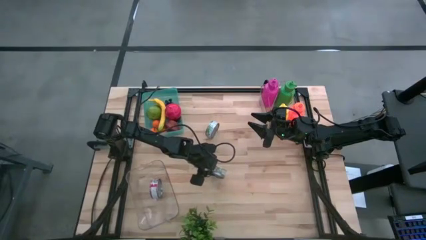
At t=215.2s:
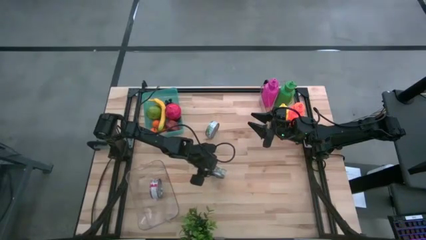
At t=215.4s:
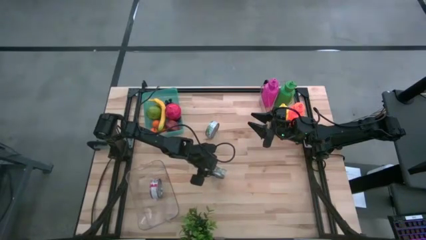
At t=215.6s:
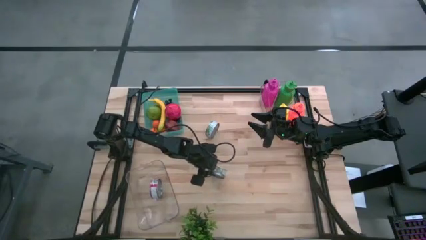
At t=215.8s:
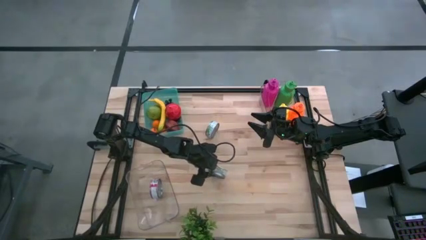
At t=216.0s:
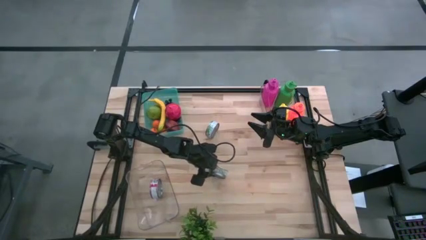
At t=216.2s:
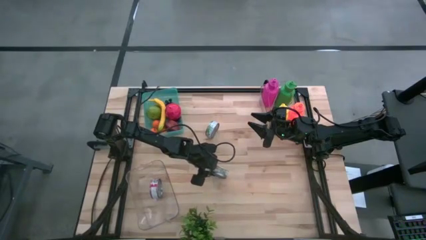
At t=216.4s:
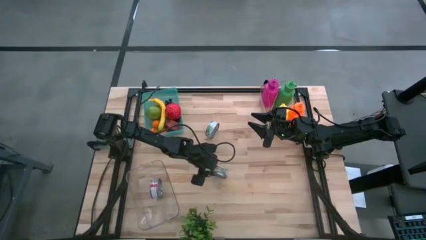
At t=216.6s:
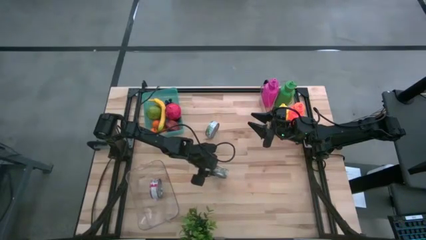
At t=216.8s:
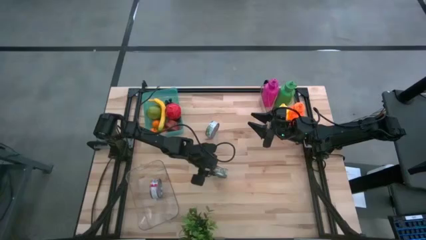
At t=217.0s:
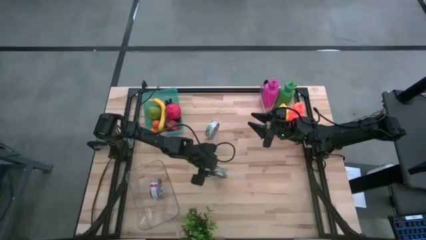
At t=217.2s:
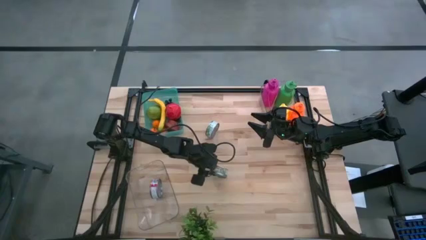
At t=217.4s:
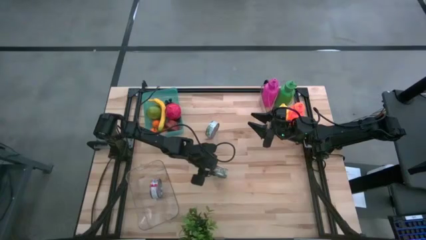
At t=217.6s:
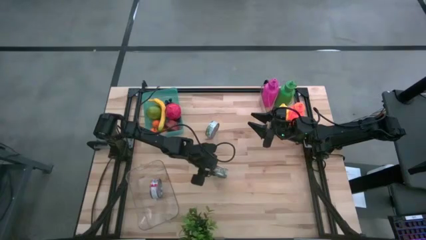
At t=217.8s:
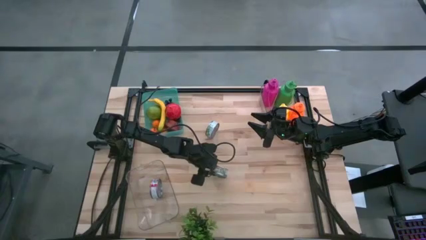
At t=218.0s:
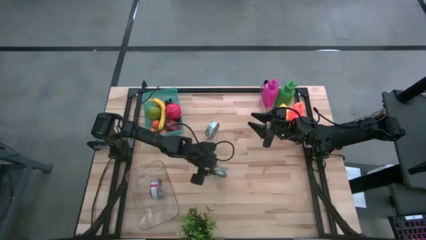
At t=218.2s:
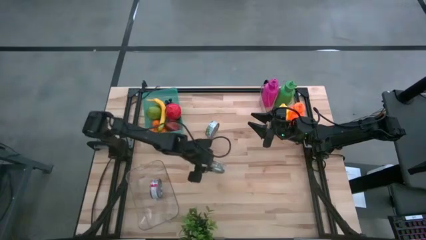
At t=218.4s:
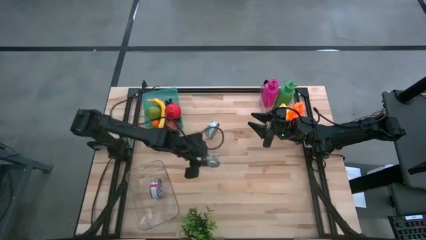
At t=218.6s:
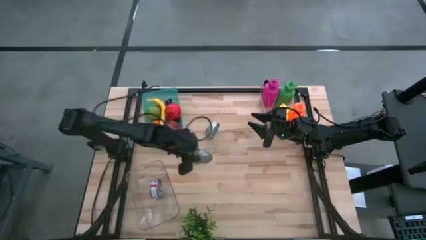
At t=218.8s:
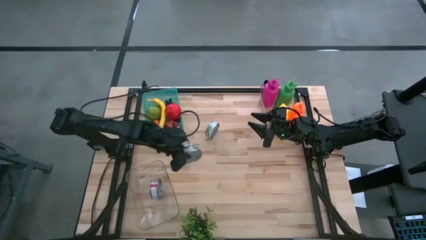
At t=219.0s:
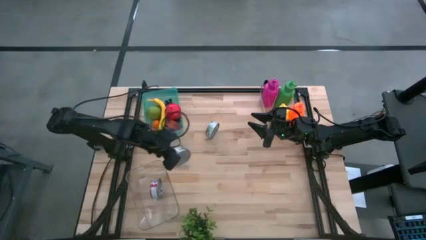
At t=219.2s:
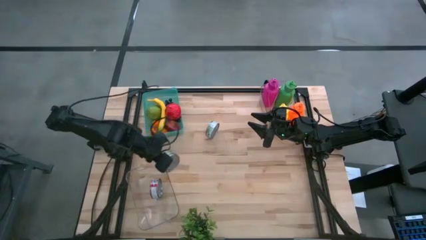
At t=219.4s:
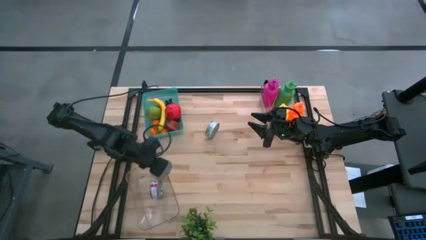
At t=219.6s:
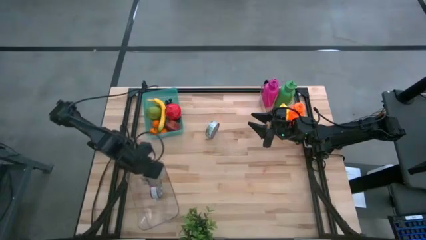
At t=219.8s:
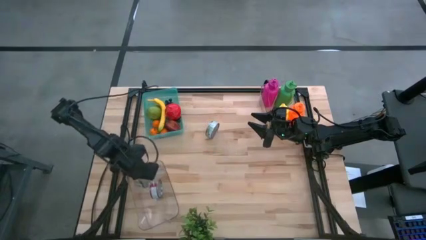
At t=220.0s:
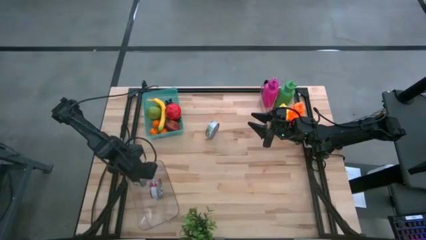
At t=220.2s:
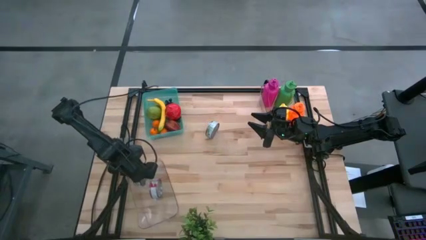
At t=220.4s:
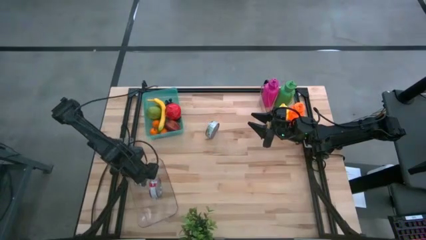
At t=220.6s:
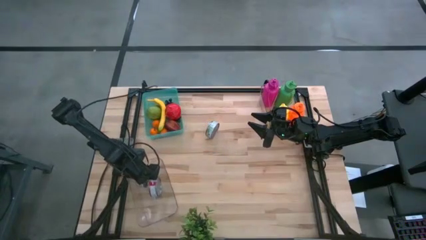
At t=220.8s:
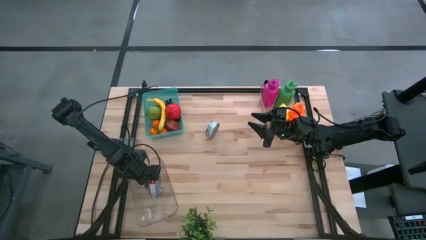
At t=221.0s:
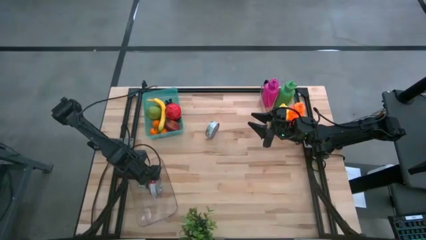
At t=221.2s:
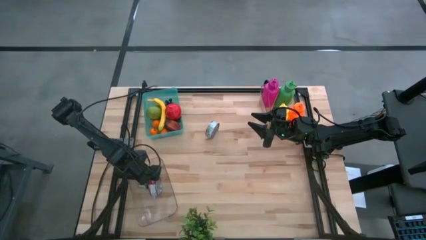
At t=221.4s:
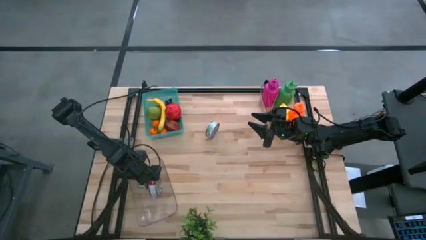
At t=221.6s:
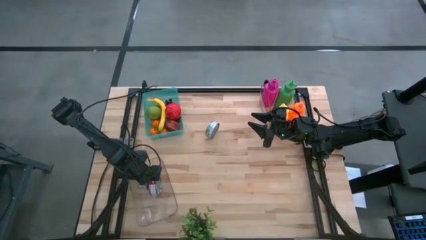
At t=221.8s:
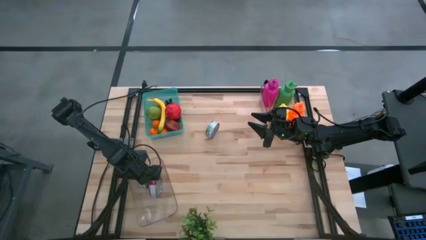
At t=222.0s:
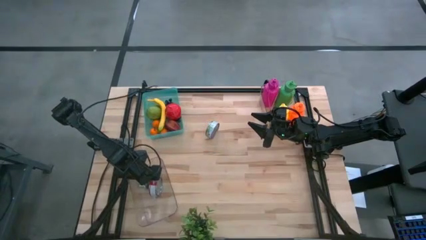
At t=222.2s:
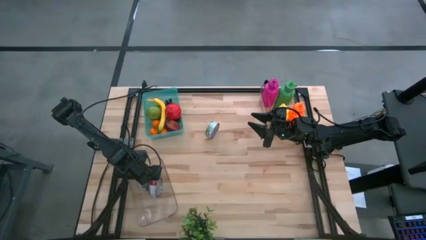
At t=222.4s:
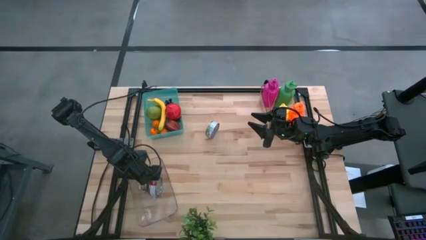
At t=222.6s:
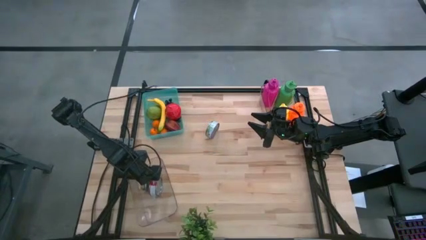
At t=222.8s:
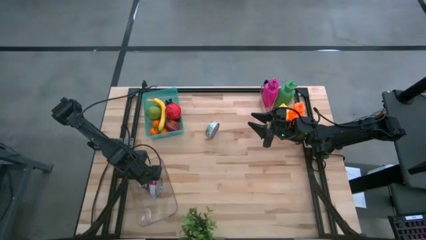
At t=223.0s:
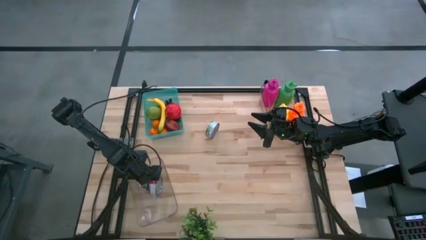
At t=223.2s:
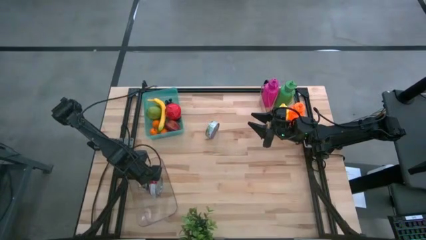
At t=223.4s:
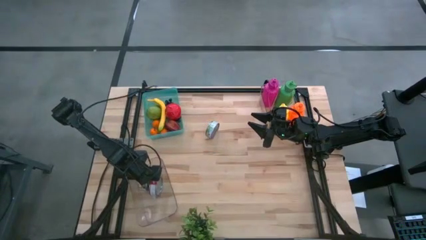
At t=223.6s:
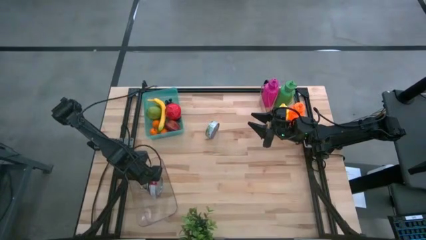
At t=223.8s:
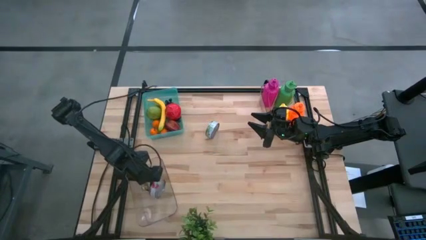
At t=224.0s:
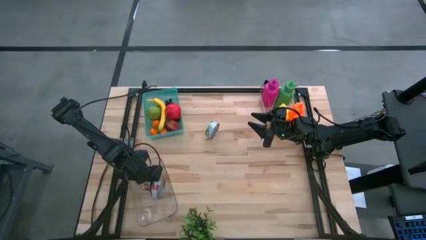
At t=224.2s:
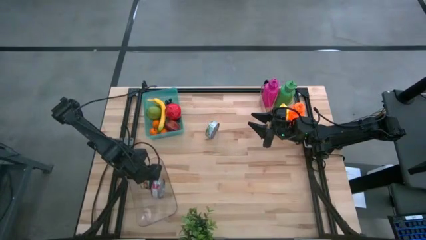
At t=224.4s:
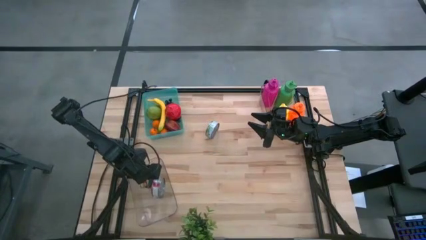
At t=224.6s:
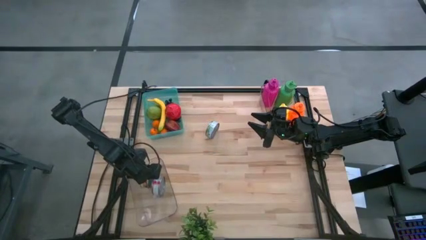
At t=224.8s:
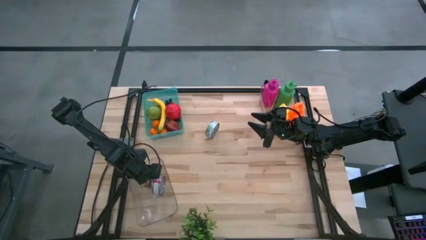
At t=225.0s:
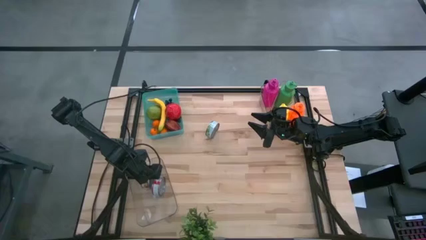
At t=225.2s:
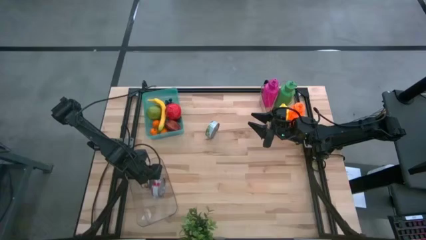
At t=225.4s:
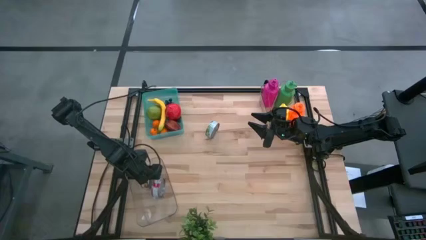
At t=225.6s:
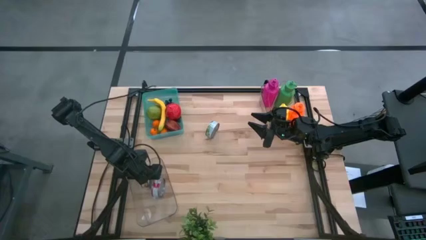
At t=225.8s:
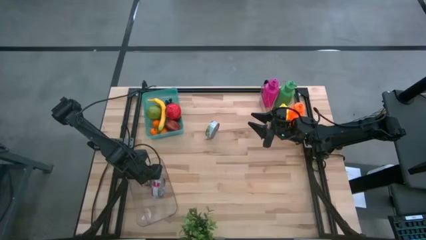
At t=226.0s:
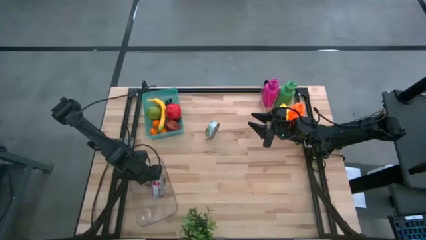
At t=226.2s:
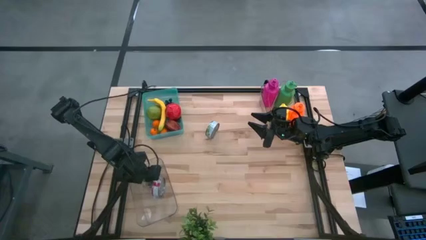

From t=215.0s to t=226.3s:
Task: Pick & Place Food Item
Put the bottom green tuna can into the left transparent bin
